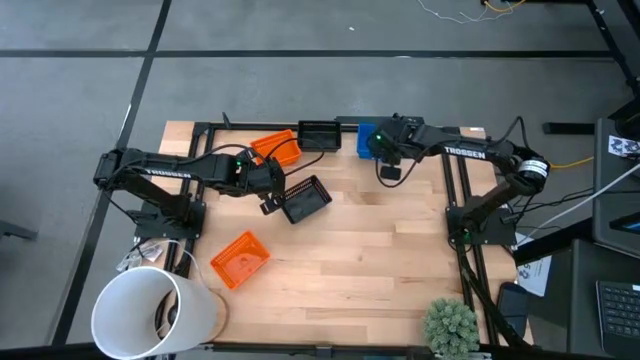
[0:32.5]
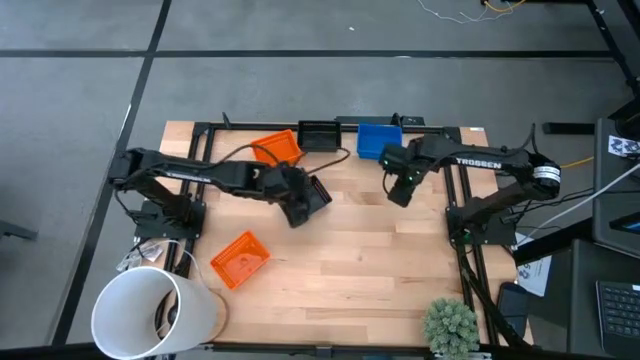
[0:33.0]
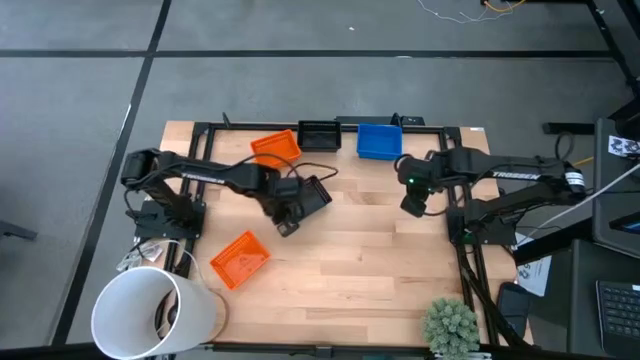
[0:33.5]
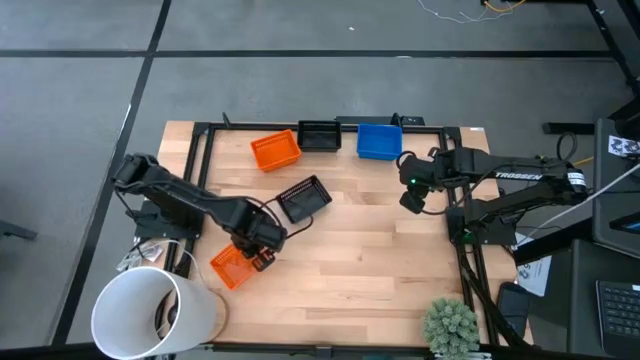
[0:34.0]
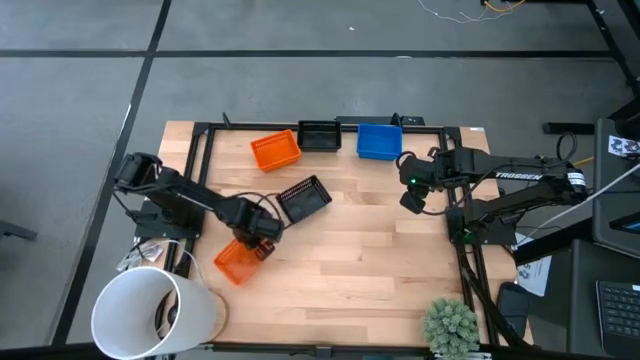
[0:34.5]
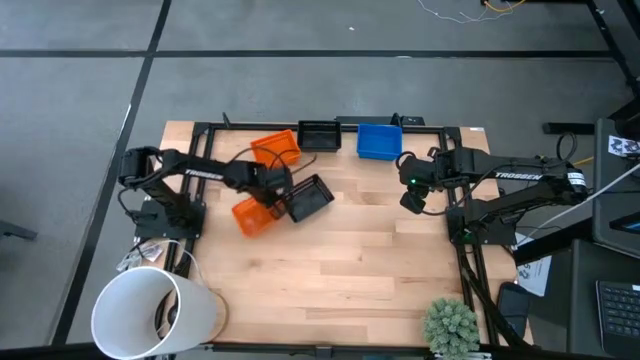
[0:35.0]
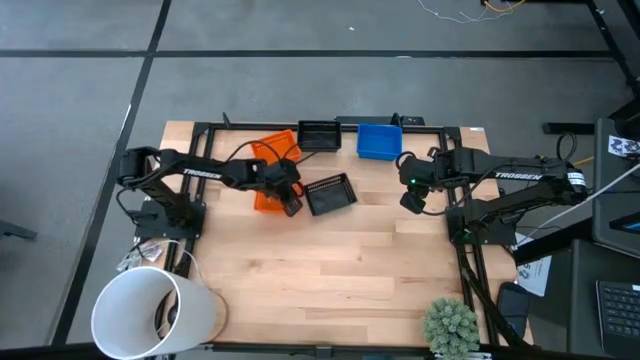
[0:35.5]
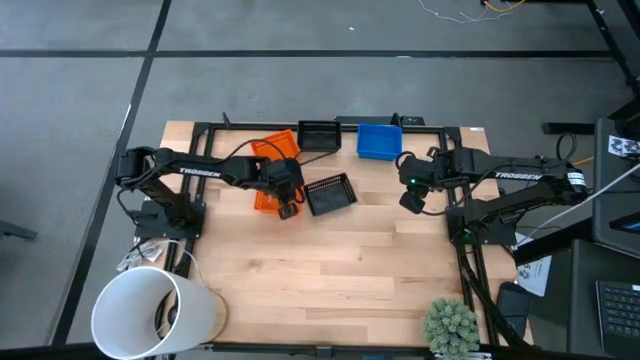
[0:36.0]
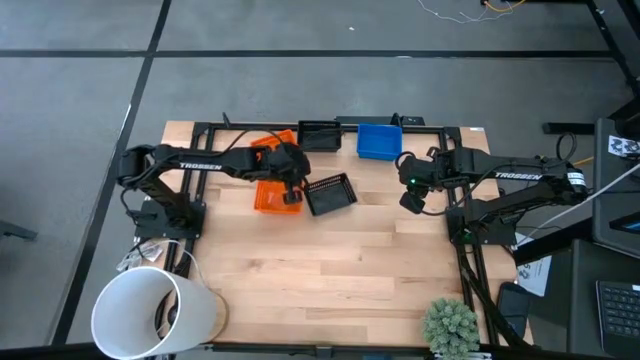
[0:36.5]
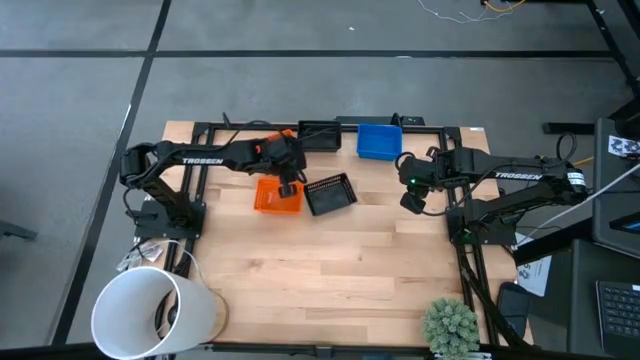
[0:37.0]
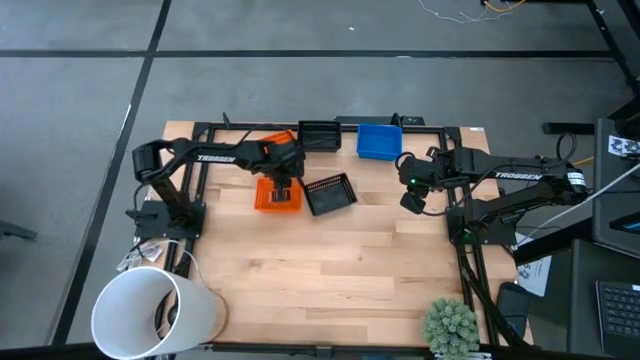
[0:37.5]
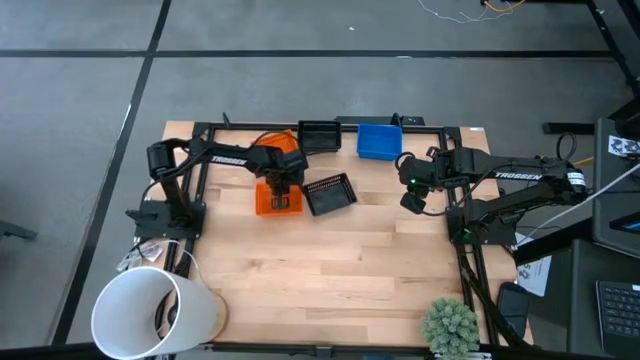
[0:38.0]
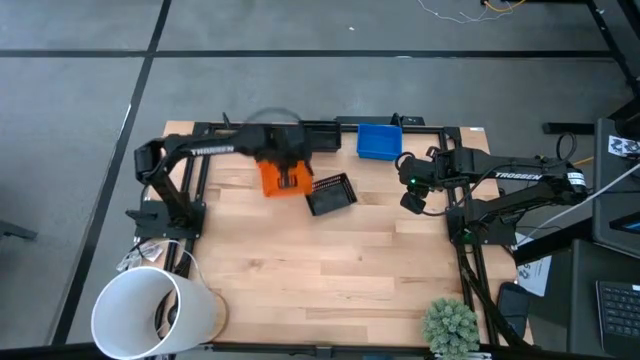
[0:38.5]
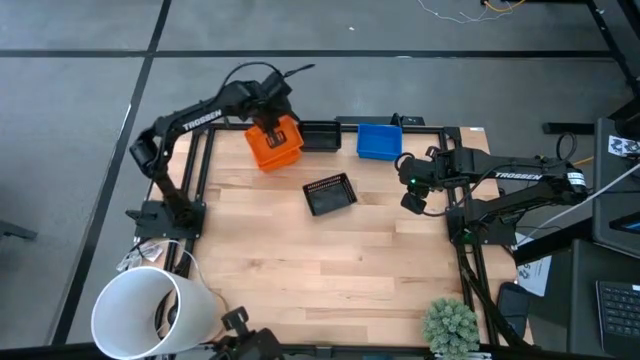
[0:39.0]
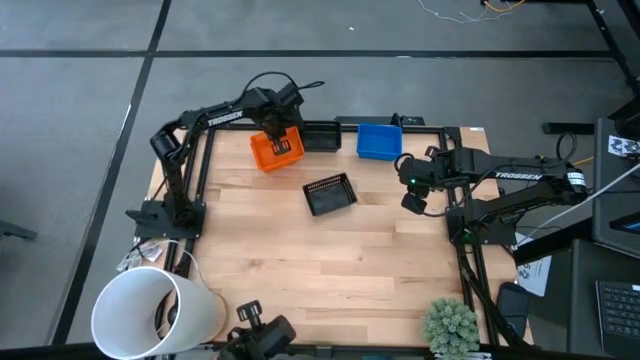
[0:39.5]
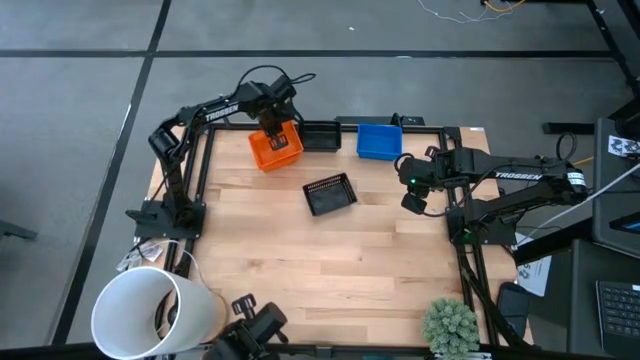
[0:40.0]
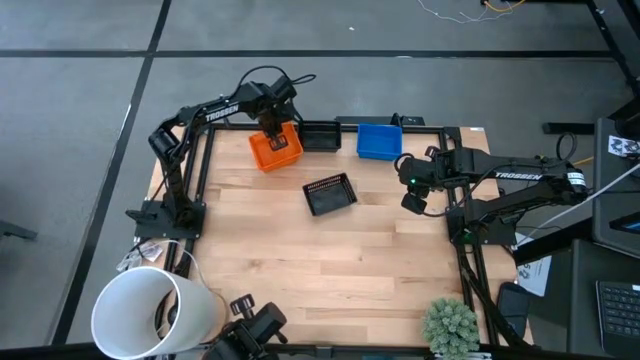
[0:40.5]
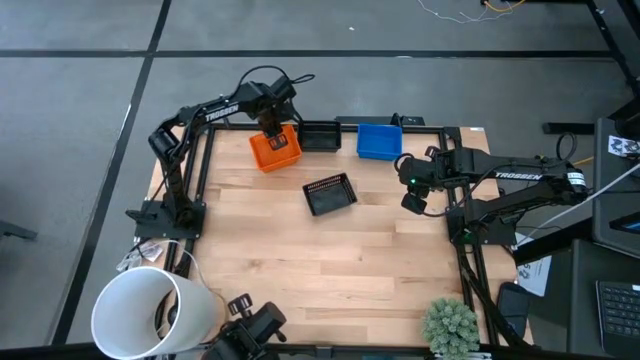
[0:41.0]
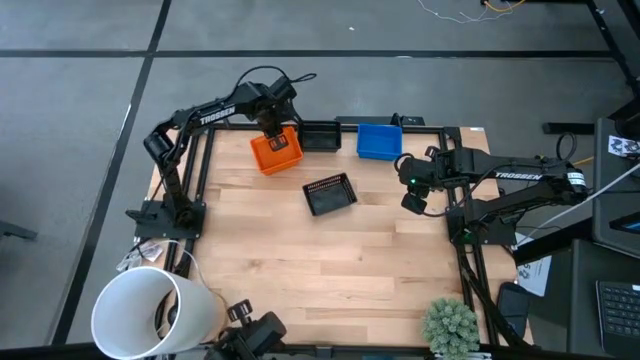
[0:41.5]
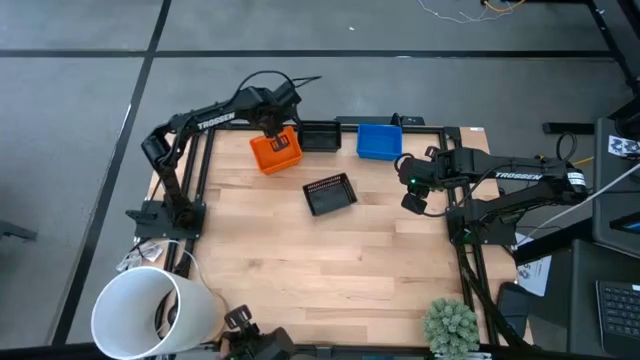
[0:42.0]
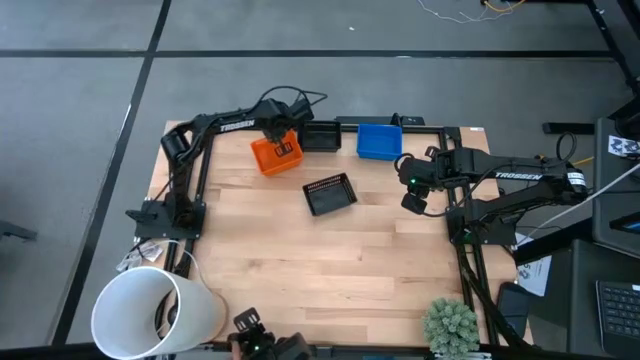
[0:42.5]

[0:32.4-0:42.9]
Stack the orange basket on top of the other orange baskets

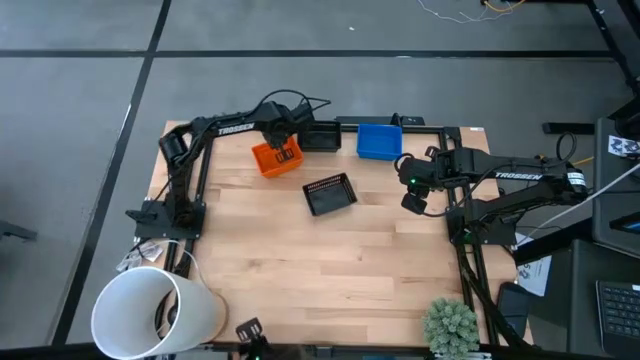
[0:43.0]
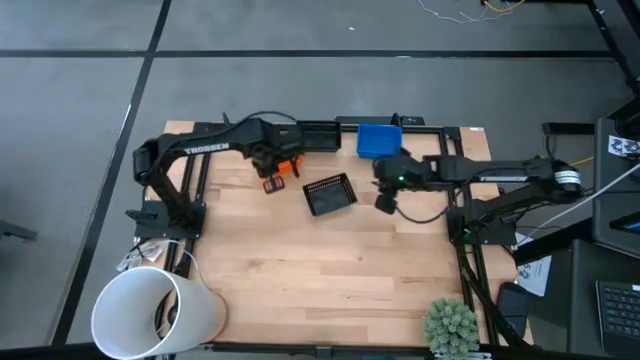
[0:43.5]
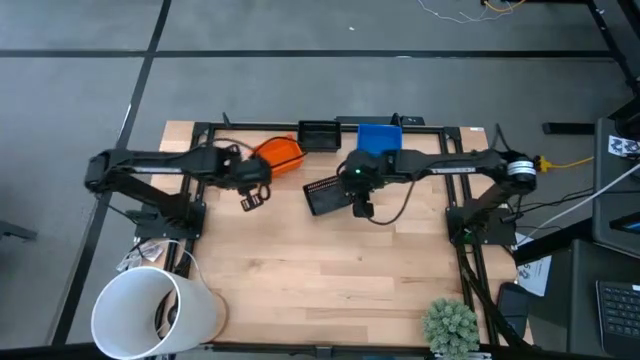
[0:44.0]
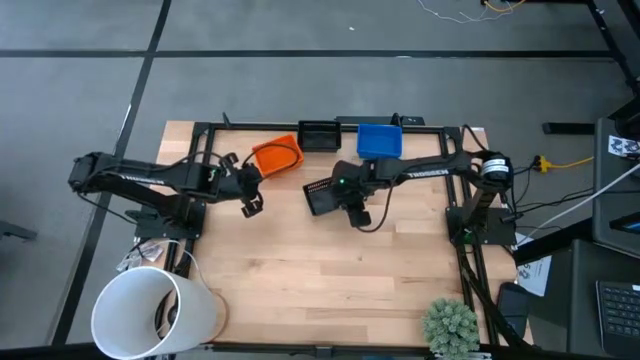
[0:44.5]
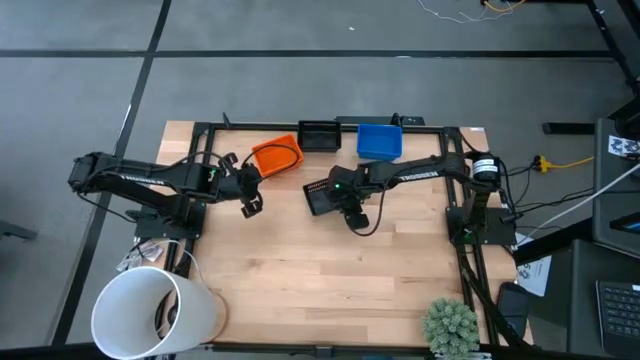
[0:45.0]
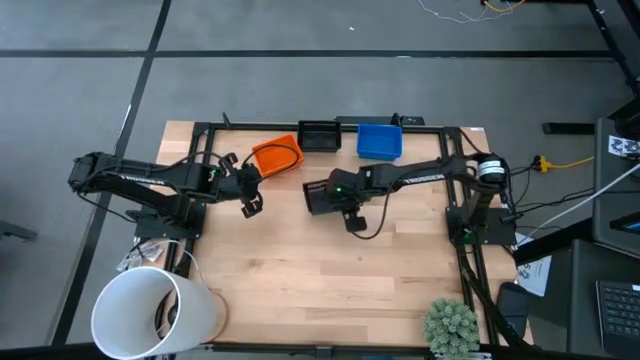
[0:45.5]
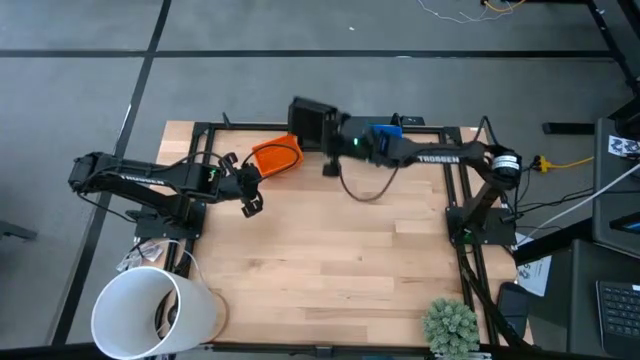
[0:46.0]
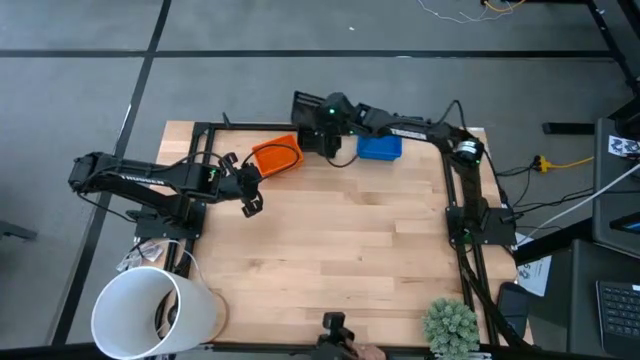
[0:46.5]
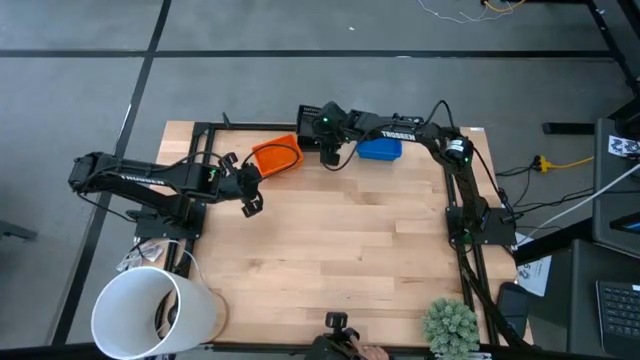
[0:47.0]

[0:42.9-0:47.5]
Stack the black basket on top of the other black baskets

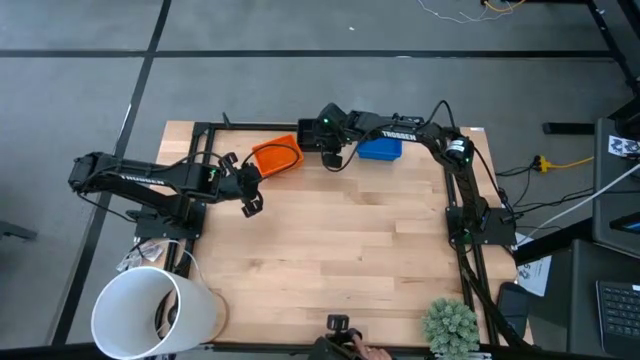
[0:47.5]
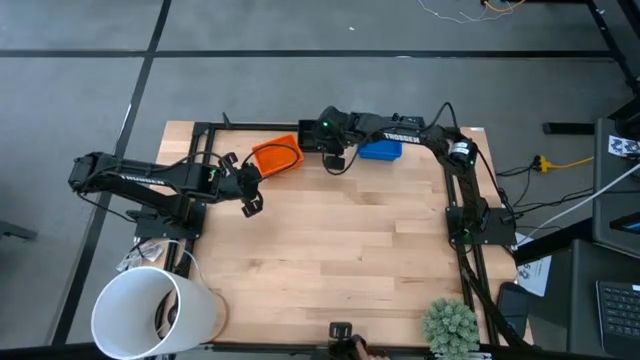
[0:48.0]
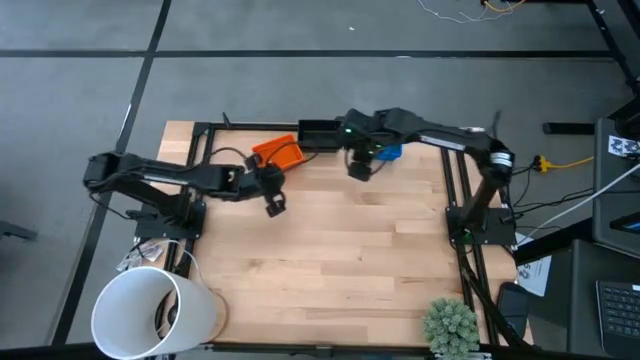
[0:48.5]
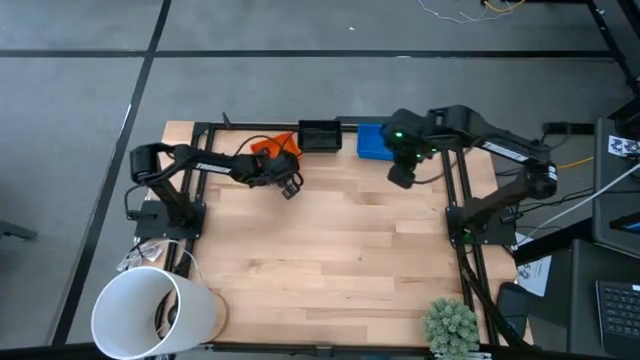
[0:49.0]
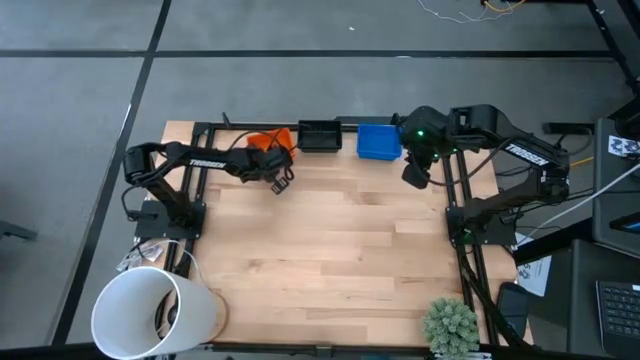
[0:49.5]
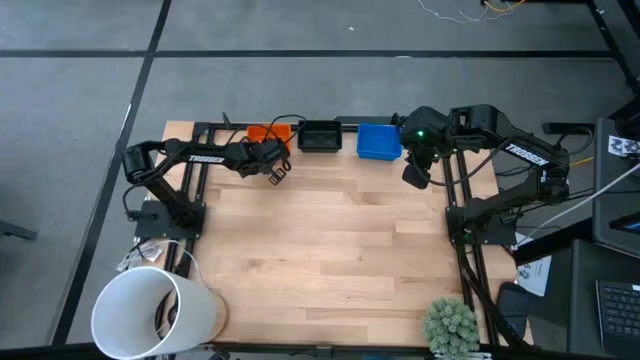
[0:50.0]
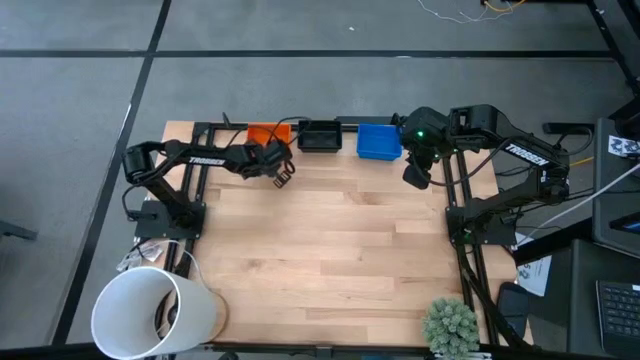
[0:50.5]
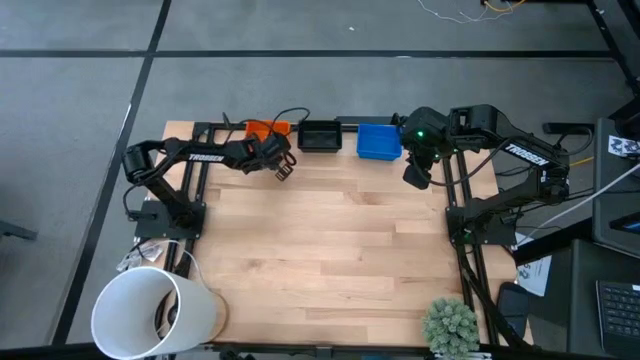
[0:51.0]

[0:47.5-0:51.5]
Adjust the stacked orange baskets

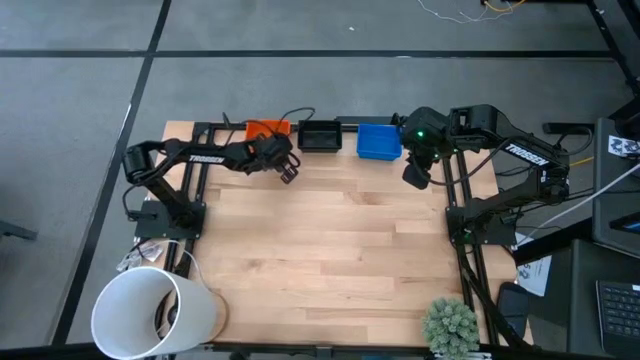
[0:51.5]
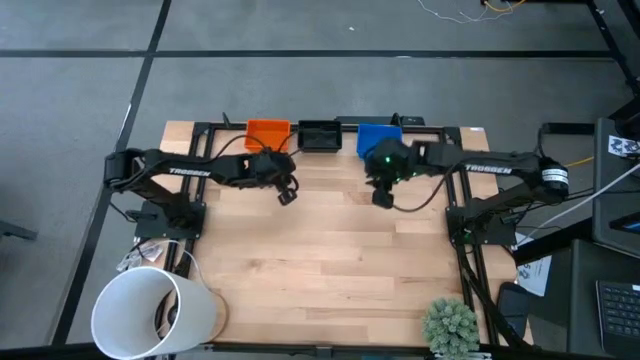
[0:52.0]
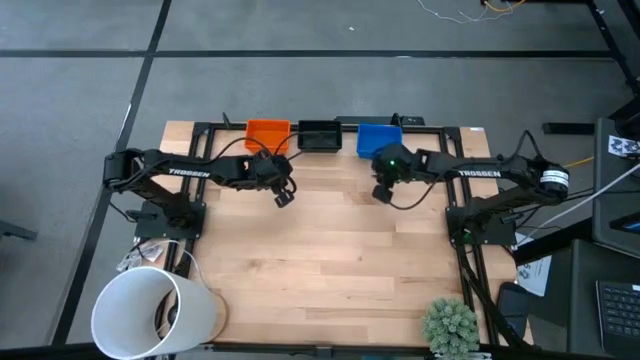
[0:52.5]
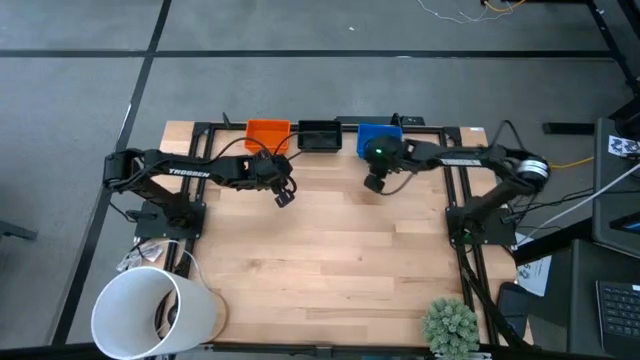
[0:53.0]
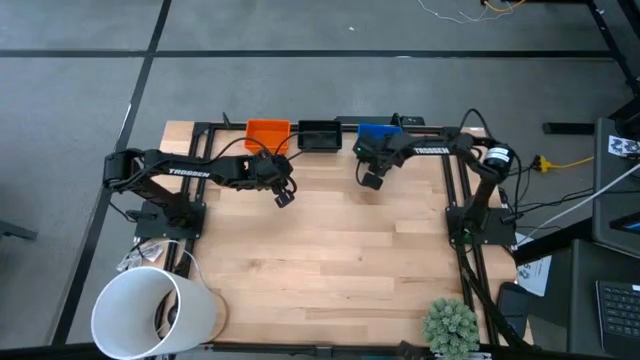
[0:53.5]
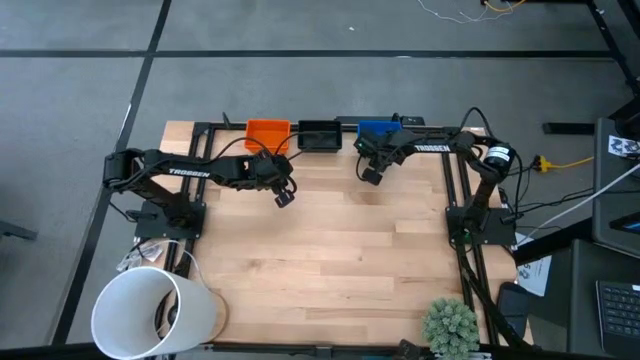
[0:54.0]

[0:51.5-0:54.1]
Adjust the stacked blue baskets
